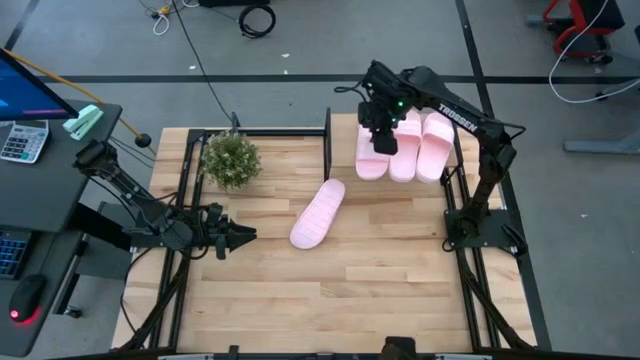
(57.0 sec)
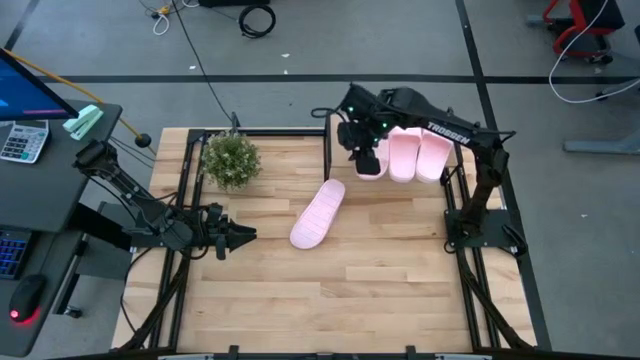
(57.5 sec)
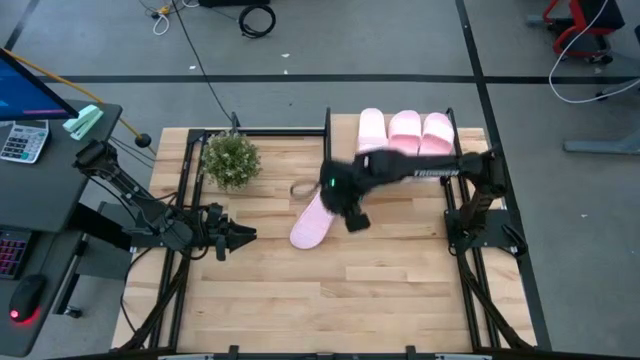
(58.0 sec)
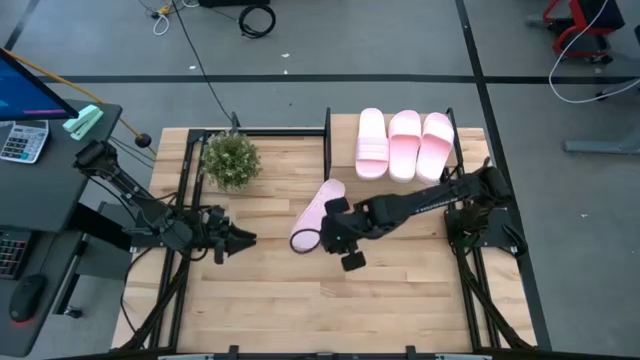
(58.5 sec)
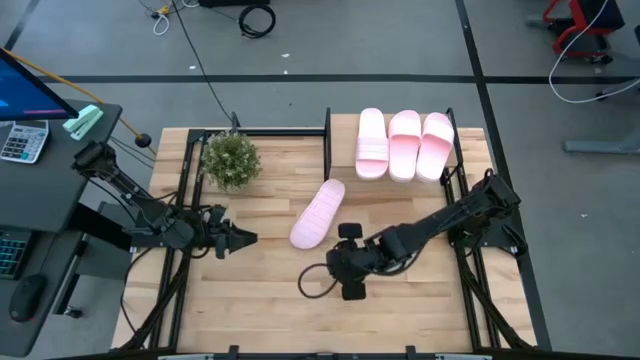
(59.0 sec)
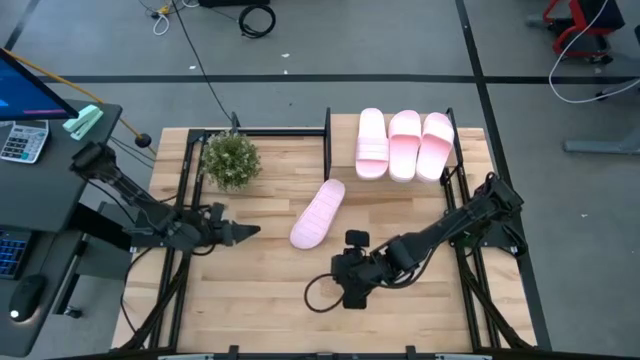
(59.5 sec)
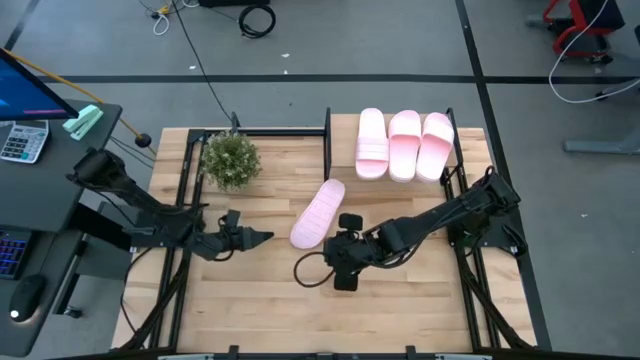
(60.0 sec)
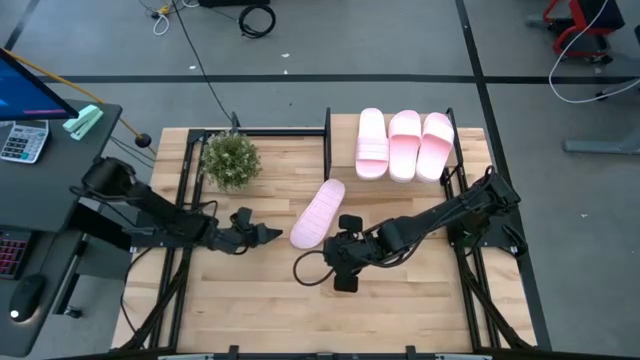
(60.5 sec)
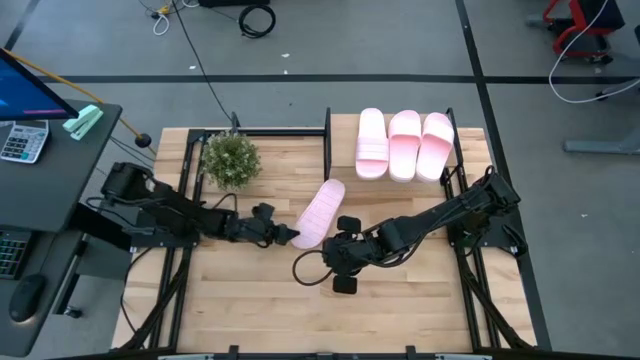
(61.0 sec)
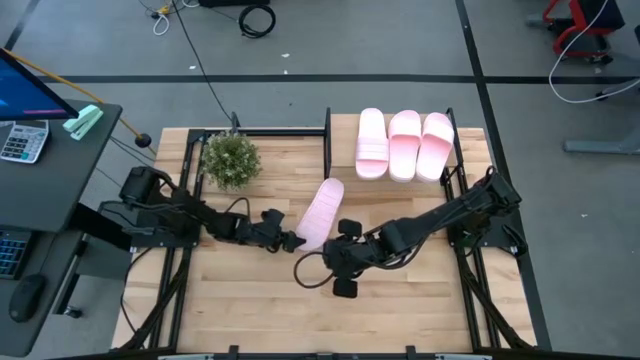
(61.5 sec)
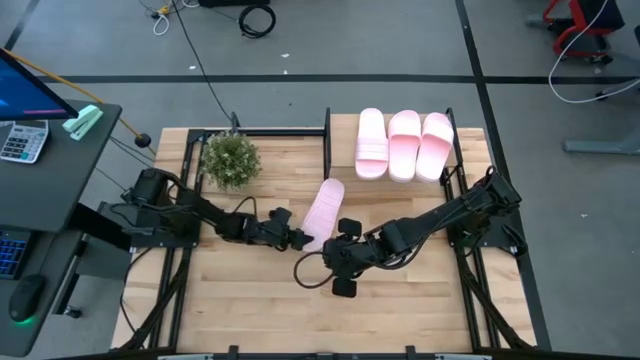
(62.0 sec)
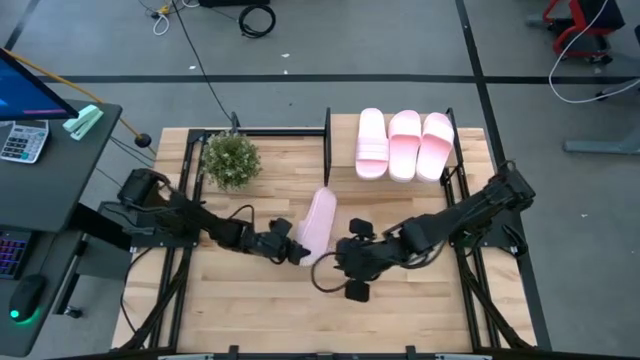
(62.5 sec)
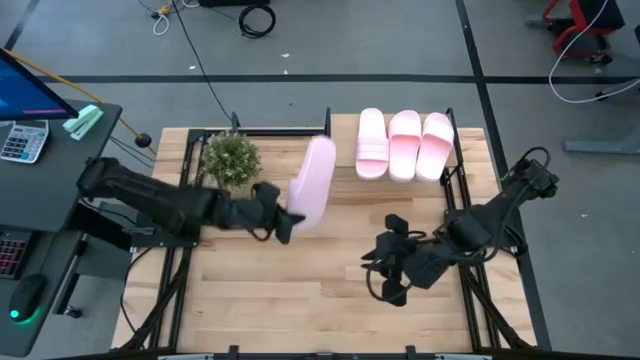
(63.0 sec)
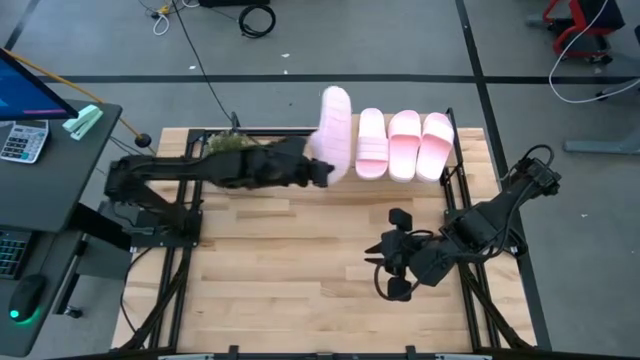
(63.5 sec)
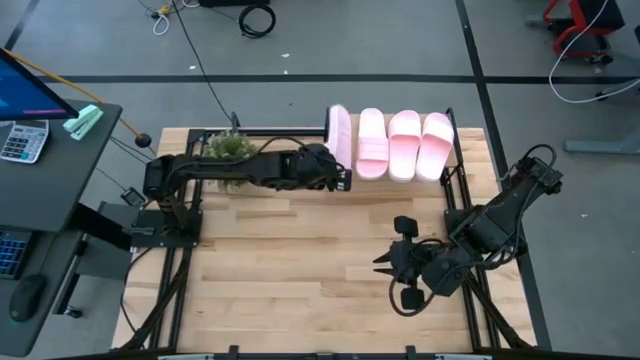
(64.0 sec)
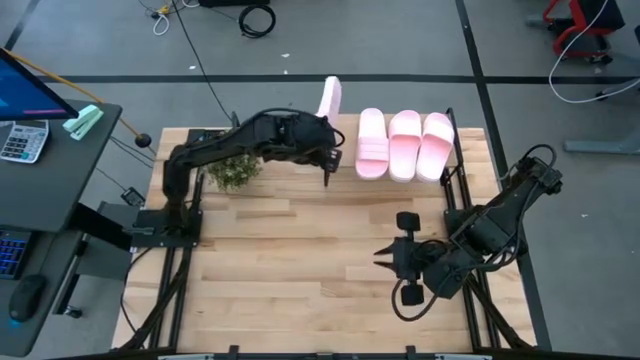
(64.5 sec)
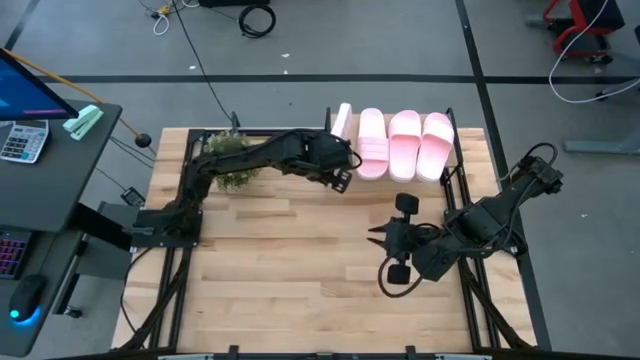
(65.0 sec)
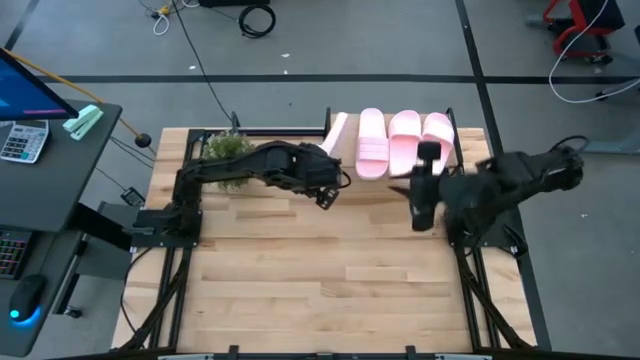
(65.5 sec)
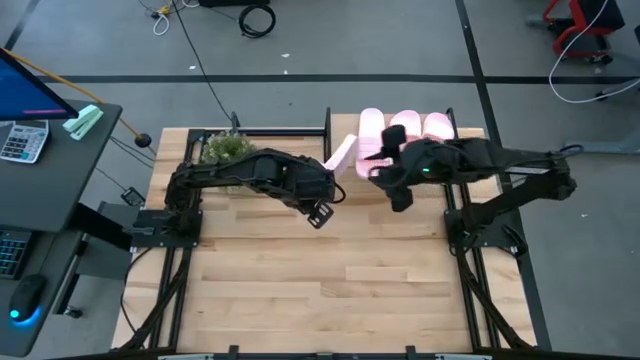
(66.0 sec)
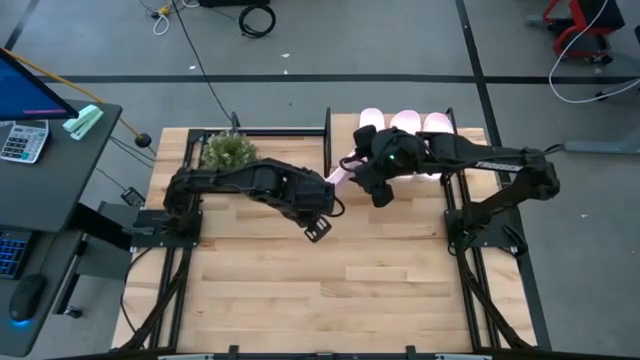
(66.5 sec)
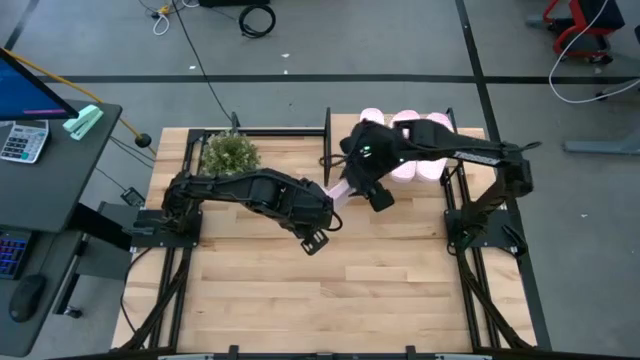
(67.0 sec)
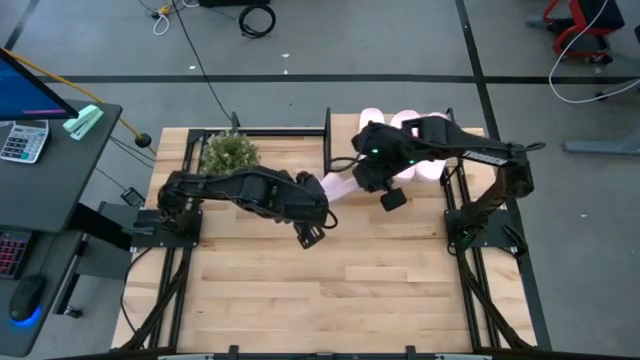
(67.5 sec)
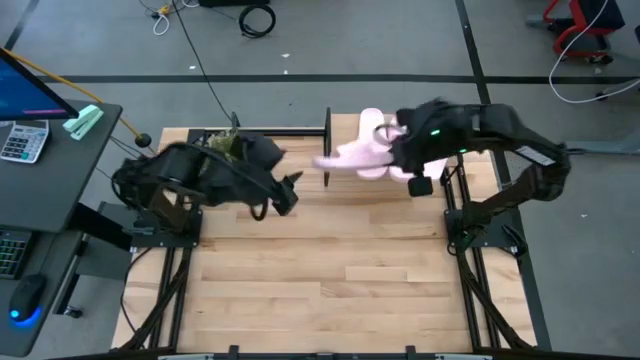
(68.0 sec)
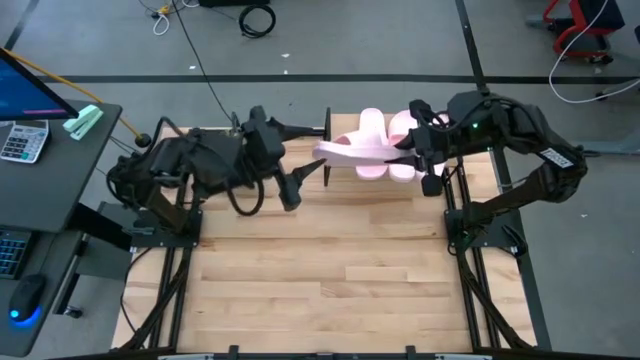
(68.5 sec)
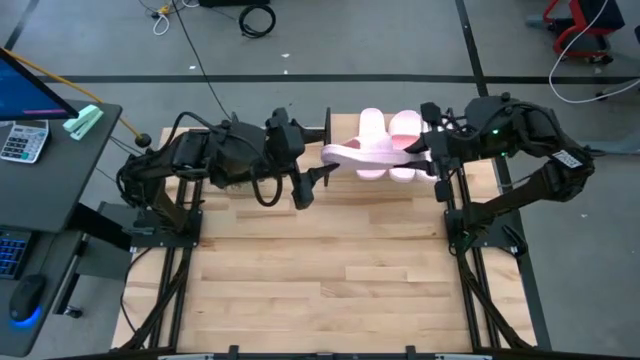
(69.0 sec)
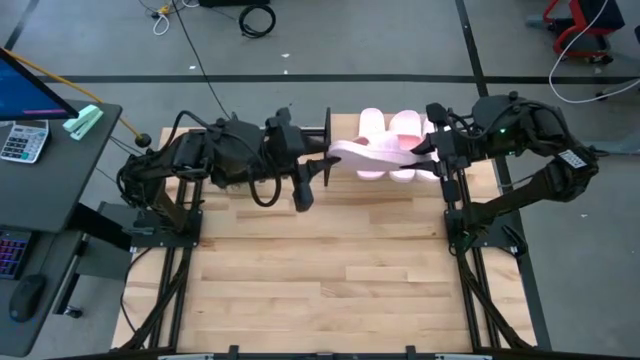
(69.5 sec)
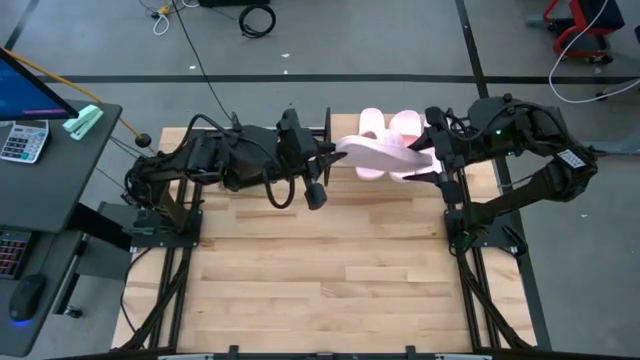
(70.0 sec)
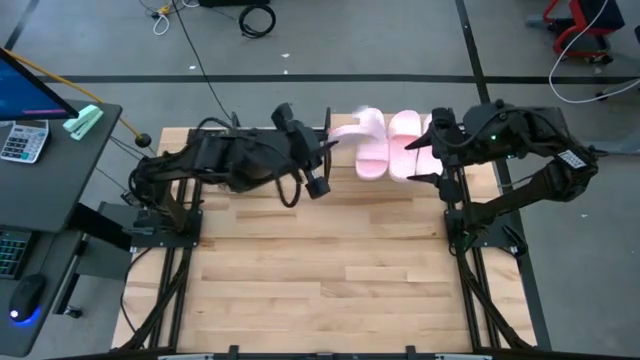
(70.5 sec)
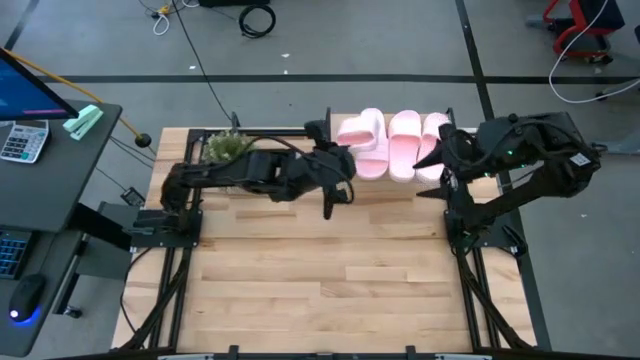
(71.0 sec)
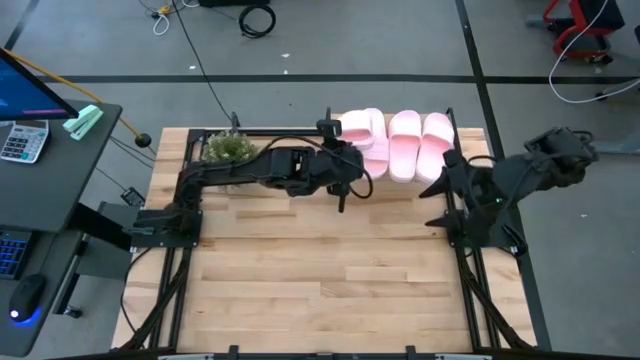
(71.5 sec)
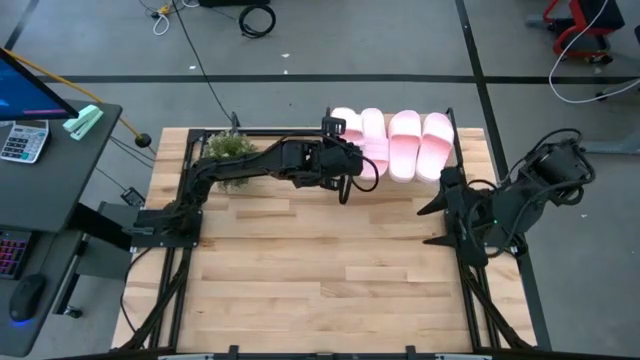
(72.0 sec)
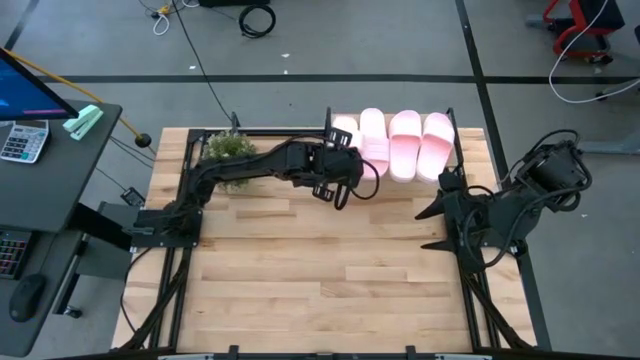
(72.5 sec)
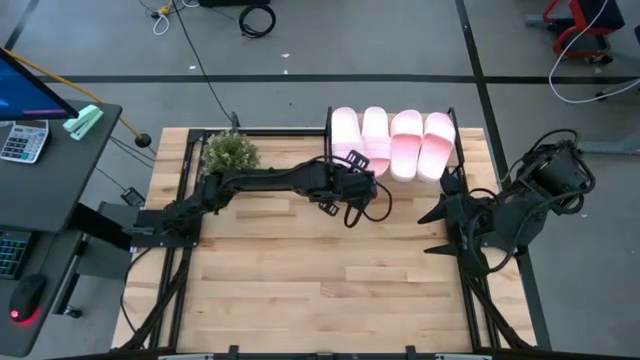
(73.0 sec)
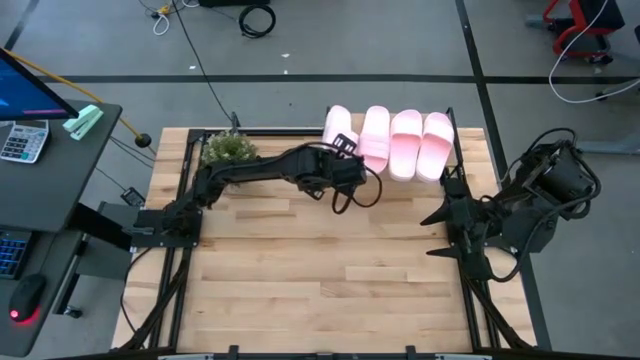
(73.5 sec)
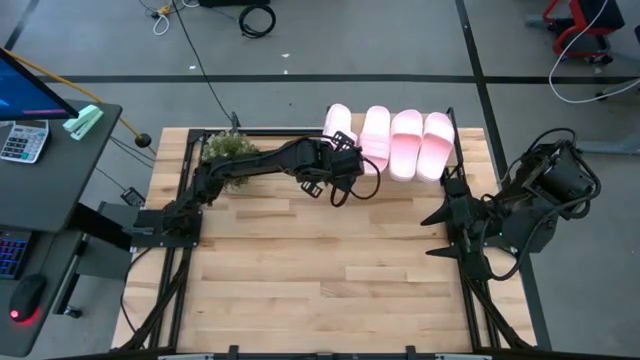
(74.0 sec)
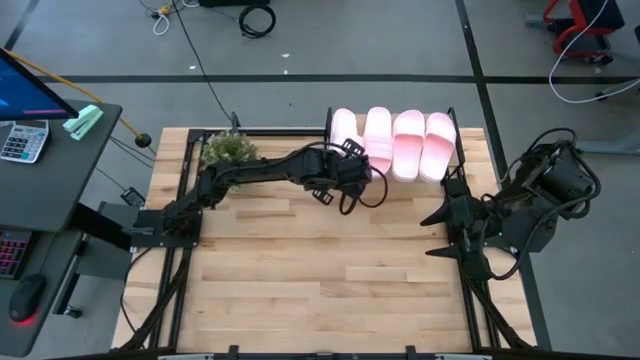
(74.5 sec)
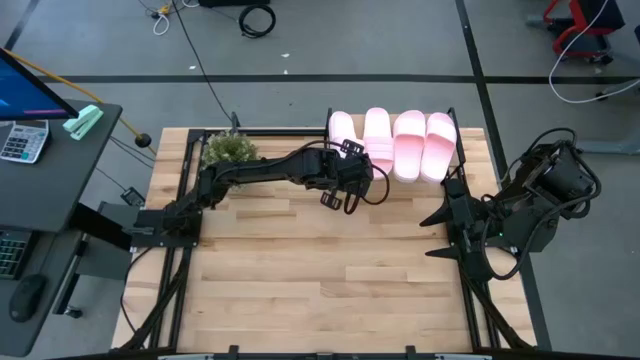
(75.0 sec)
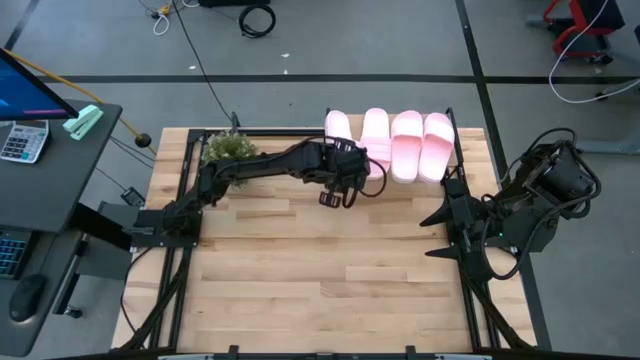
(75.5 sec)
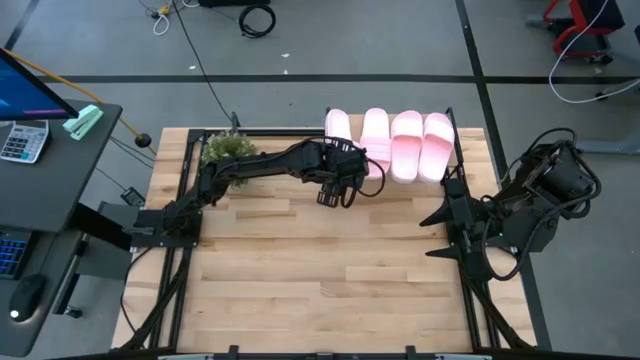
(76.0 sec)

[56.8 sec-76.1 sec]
Task: Pick and place slides into the shelf
Put the pink slide on the shelf
